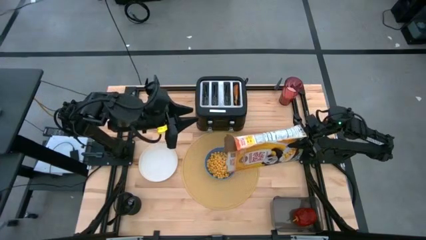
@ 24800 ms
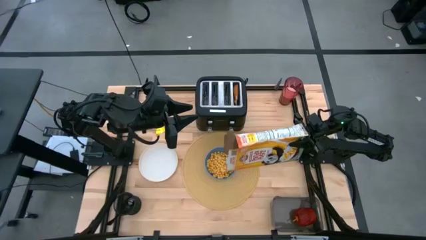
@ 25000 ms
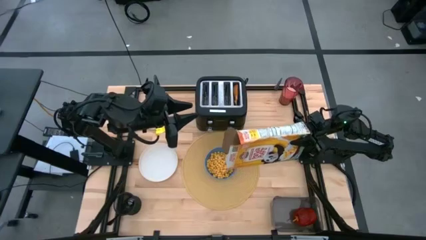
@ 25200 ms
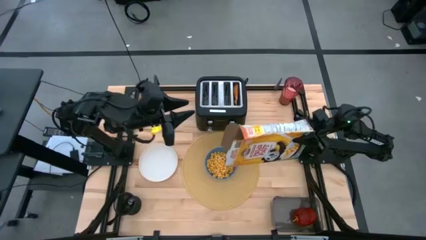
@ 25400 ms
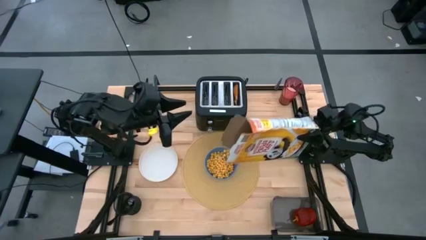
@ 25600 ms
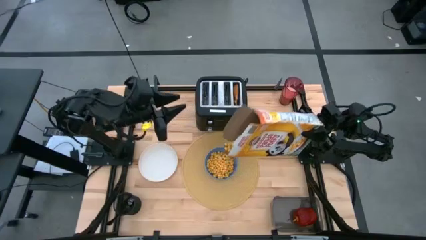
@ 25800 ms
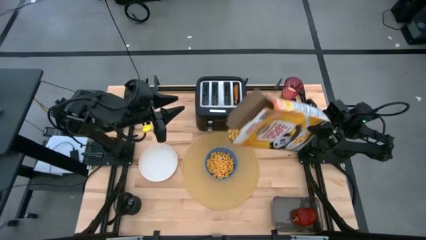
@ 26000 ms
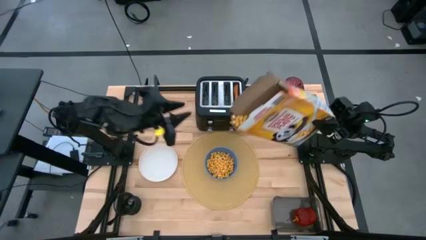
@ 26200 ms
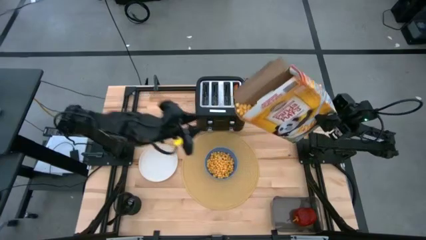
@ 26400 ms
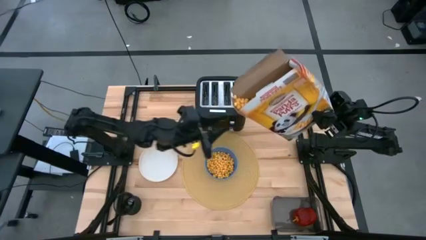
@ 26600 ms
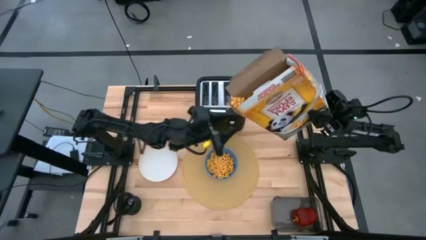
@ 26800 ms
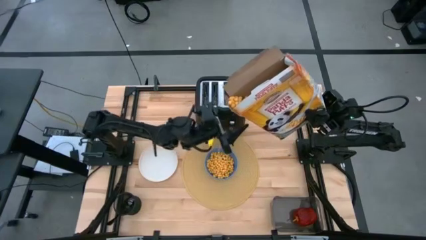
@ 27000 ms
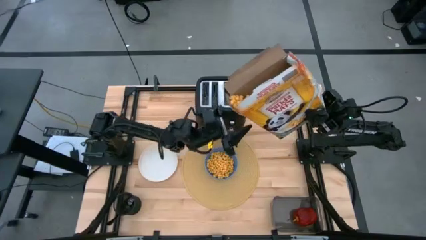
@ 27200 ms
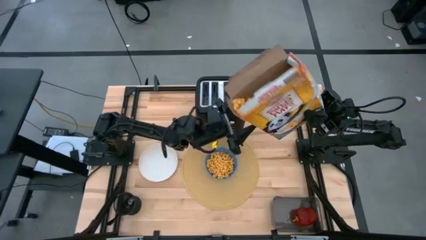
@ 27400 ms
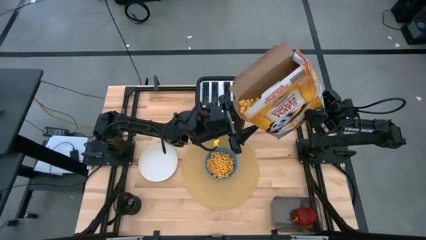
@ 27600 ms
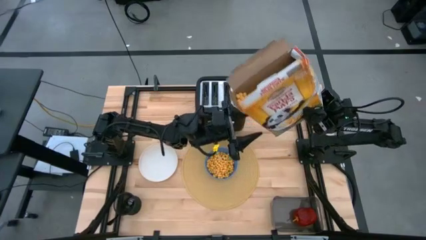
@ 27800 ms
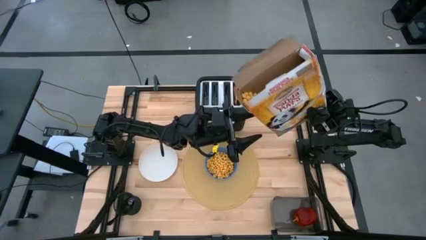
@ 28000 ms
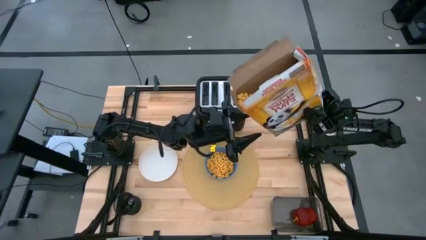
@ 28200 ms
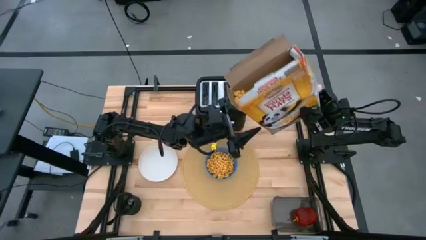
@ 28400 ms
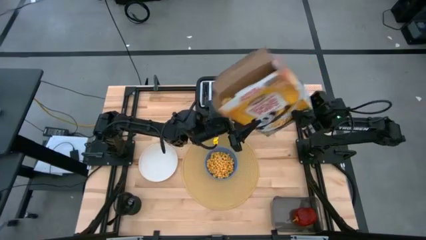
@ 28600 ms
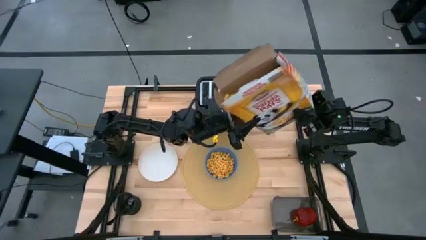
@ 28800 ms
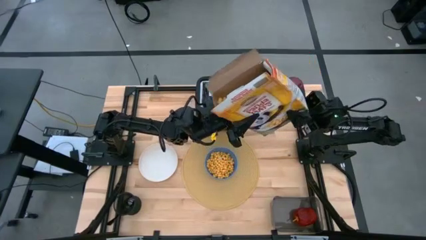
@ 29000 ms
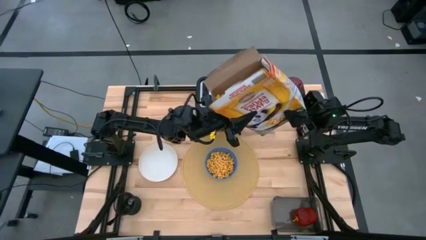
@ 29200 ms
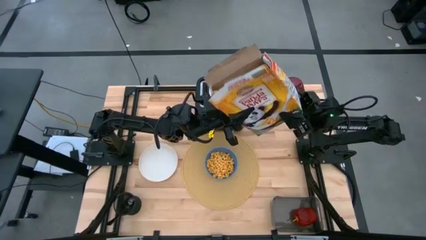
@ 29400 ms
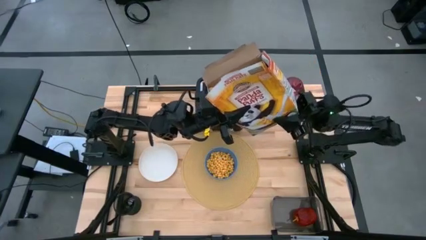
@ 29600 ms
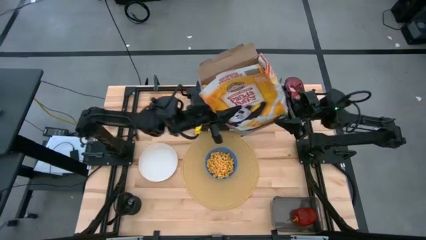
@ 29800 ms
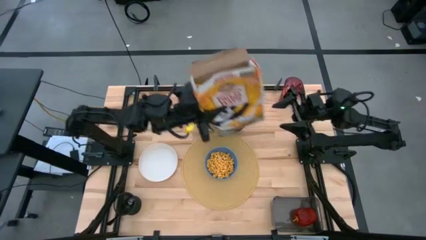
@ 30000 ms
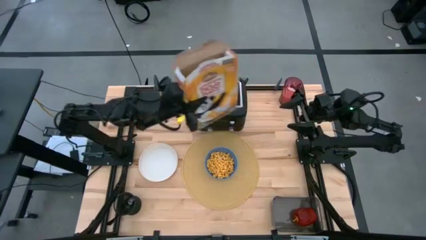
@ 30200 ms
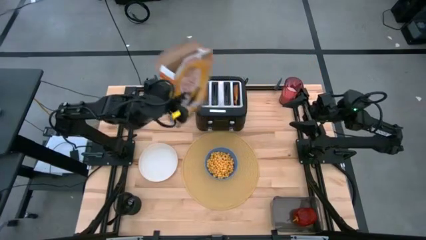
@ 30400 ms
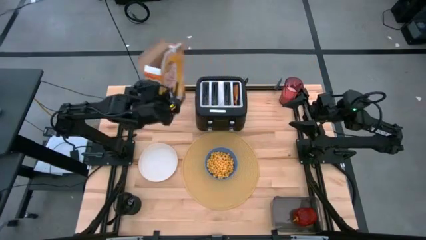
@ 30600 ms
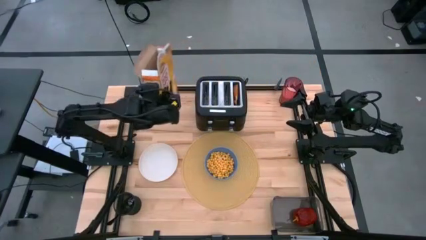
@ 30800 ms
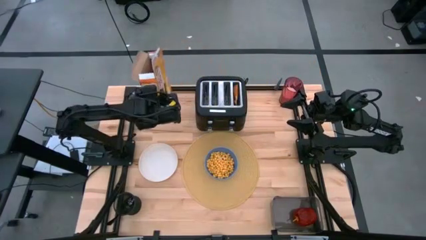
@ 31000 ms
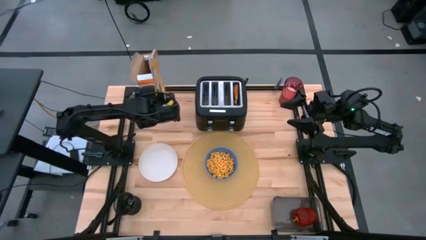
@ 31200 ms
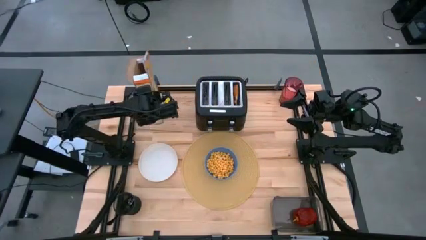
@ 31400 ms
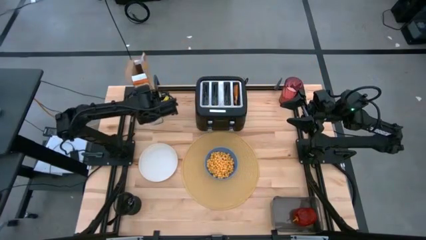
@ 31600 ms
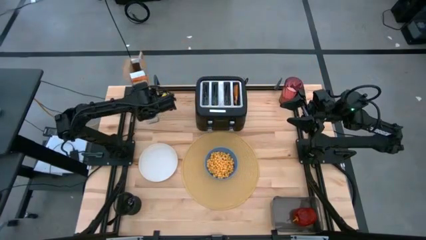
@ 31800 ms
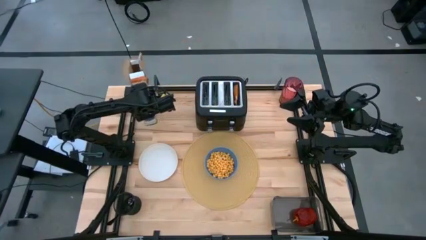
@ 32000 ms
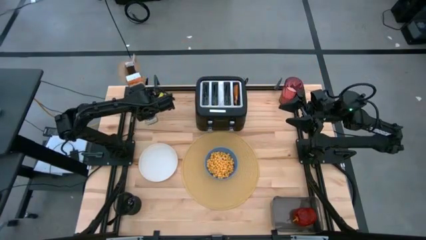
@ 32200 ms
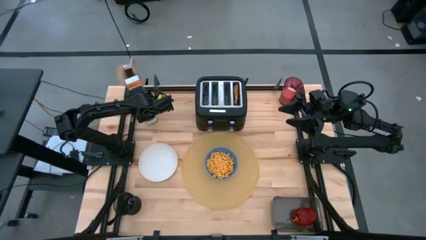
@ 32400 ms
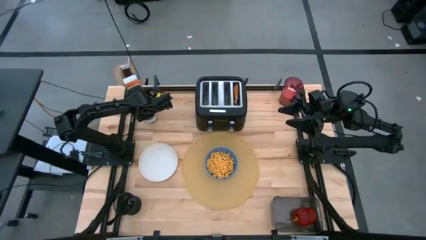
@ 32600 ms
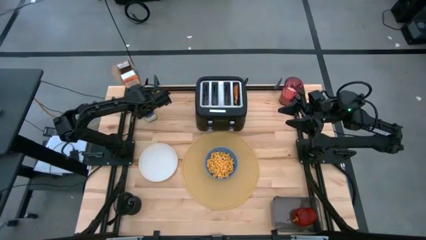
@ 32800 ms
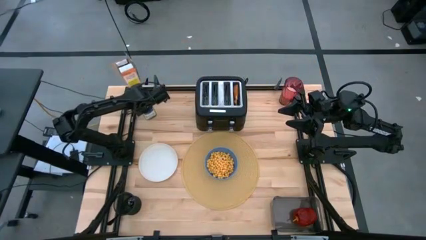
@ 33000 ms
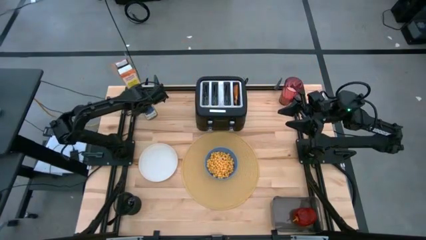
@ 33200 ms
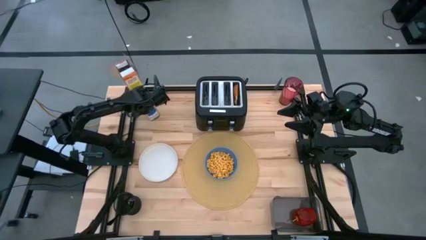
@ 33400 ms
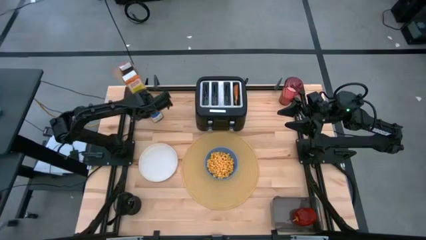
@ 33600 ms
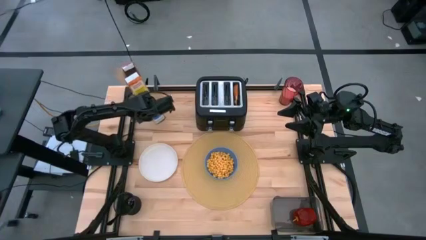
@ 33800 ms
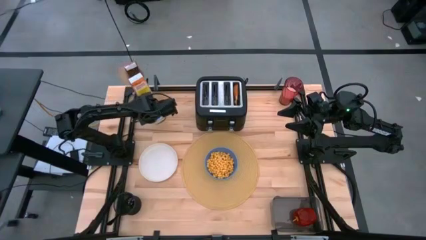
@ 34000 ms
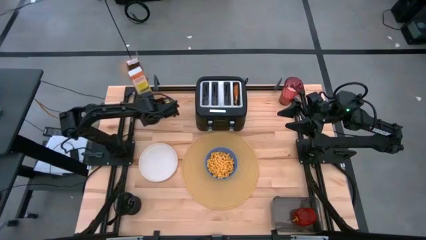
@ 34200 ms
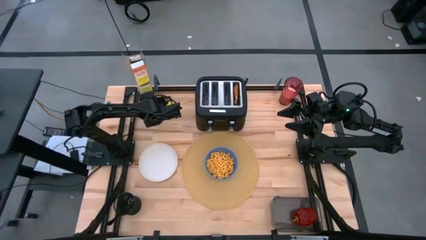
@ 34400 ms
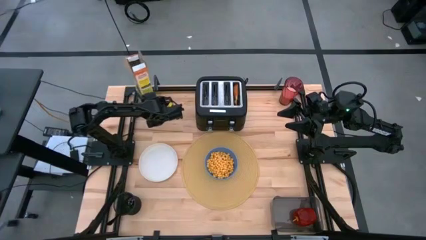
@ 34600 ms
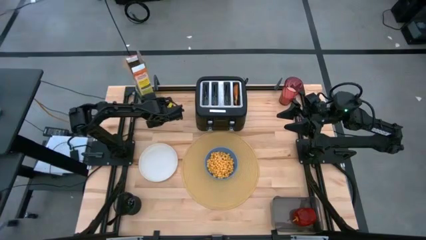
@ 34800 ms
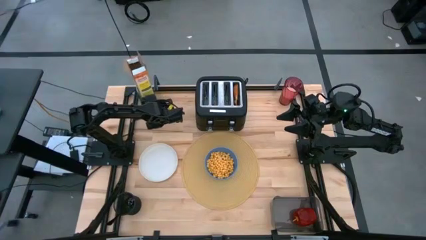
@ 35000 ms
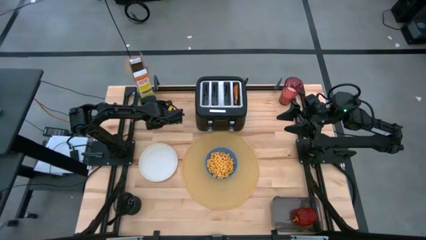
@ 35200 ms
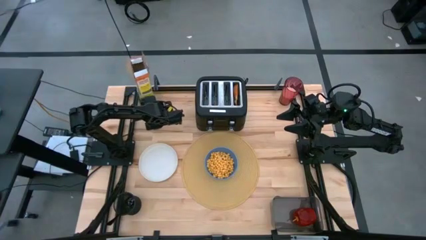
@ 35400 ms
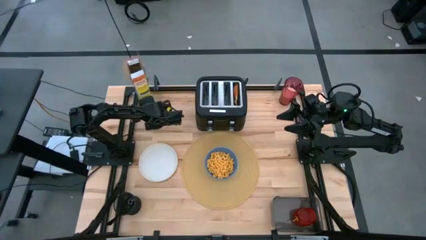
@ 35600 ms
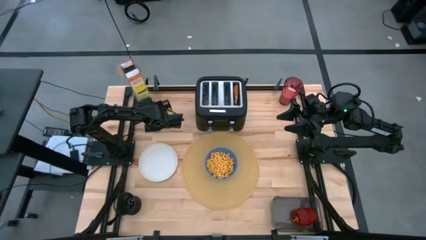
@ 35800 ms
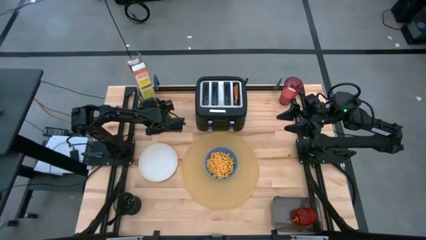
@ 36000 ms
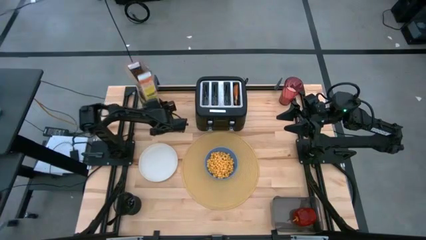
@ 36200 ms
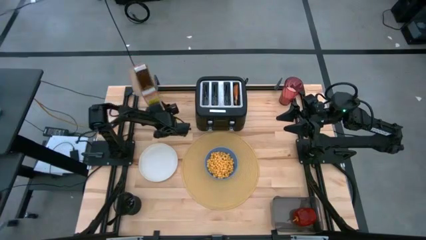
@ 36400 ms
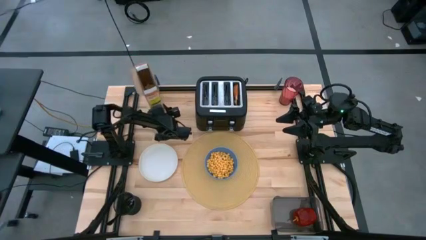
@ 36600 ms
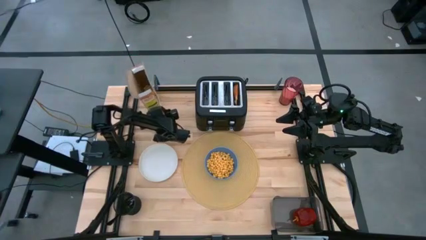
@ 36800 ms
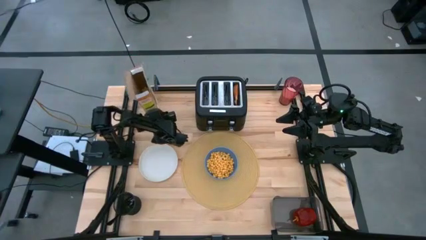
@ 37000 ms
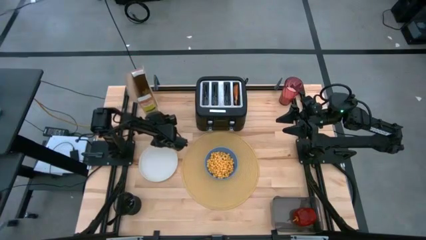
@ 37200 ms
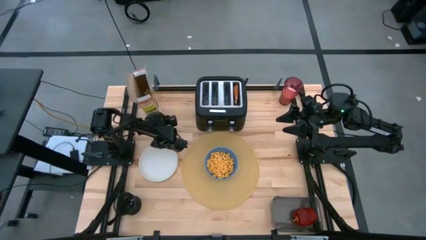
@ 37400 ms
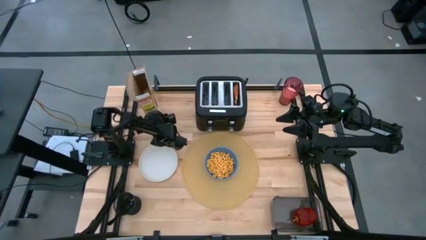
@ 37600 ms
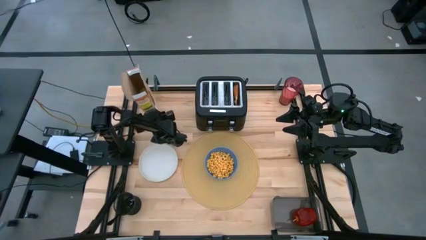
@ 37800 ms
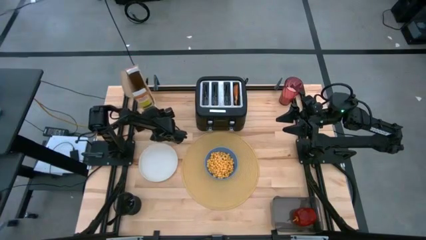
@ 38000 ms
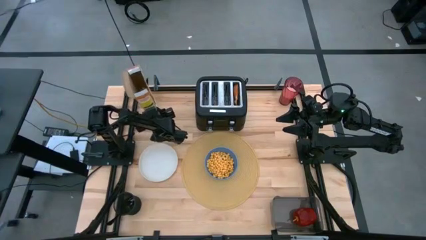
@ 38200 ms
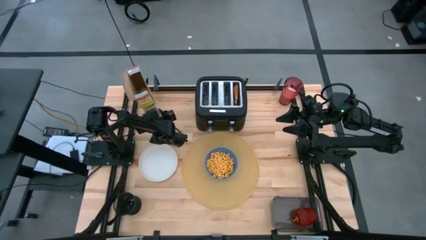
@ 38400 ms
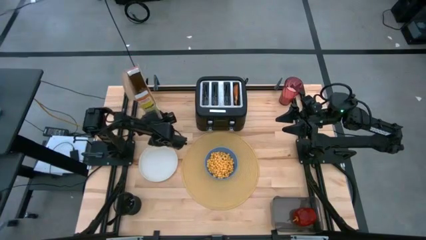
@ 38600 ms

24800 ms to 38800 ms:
Task: Arrange a breakfast setting
Pour the cereal from the cereal box into the bowl

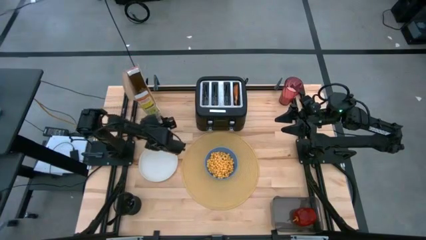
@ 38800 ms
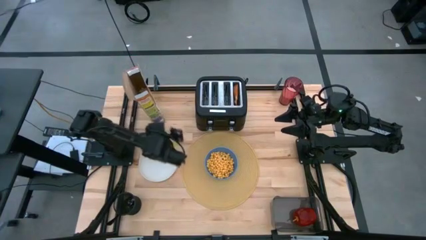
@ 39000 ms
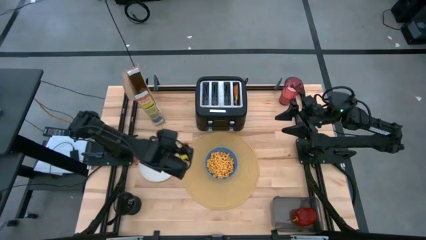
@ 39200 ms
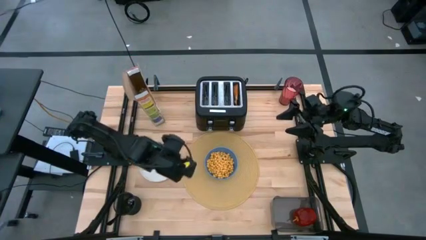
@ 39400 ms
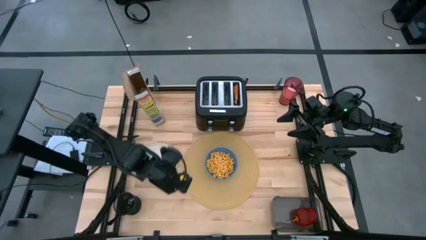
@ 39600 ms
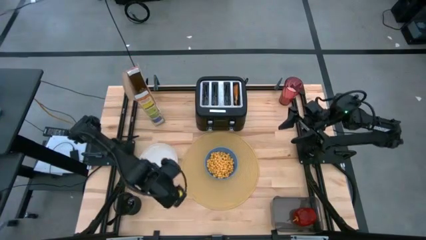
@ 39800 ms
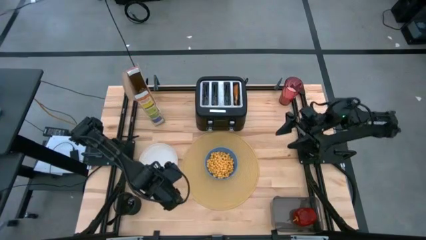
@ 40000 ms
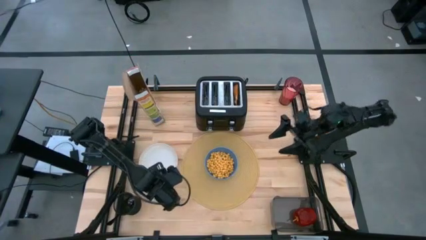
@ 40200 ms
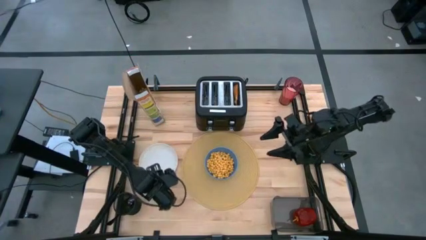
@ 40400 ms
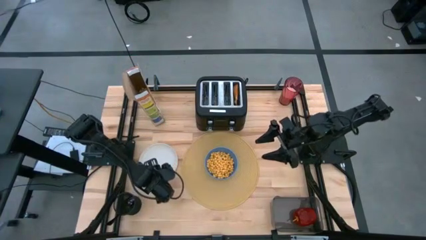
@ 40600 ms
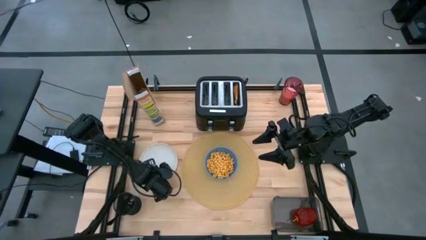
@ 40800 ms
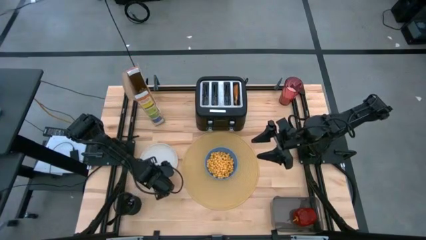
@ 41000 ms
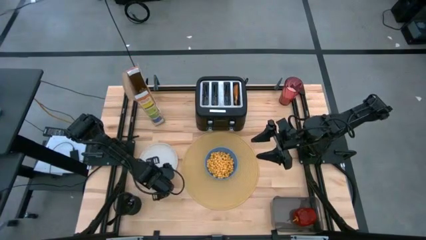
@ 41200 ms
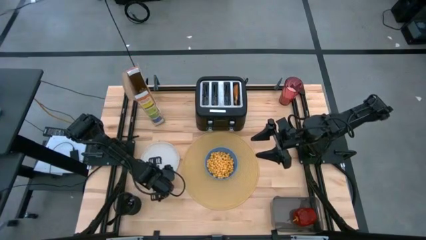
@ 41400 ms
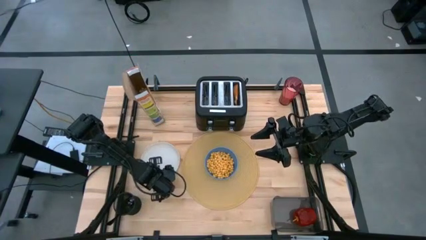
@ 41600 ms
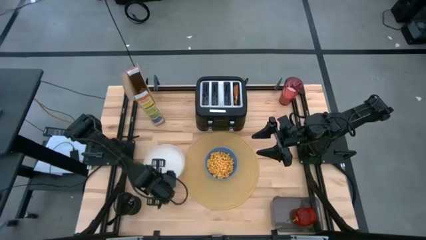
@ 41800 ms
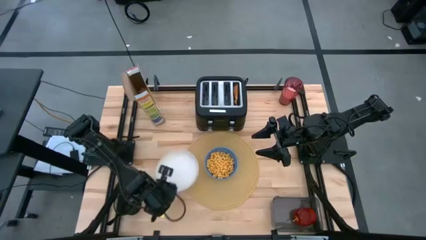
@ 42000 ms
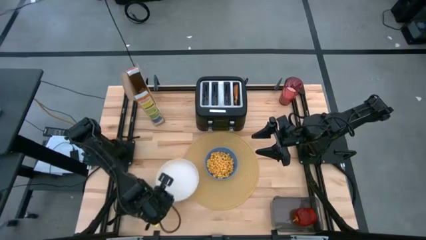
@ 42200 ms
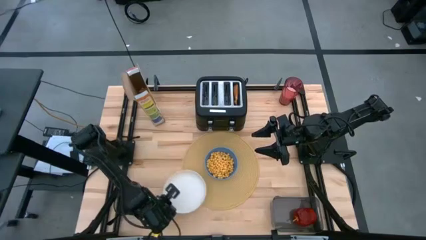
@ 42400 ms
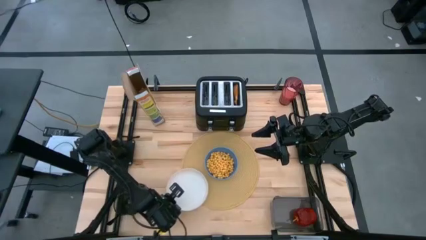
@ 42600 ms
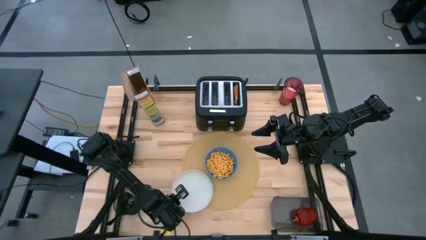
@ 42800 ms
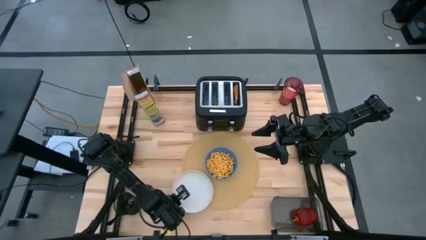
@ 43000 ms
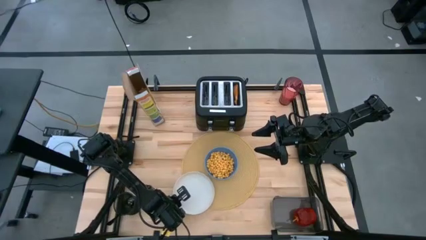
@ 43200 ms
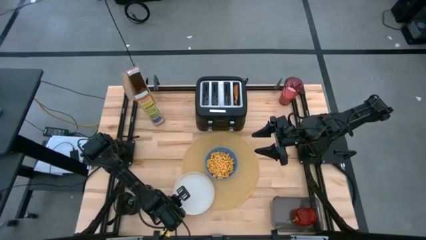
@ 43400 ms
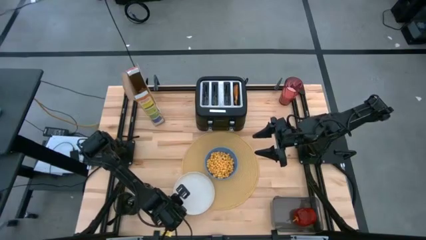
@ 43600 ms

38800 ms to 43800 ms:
Put the plate on the placemat to the bottom left of the bowl
